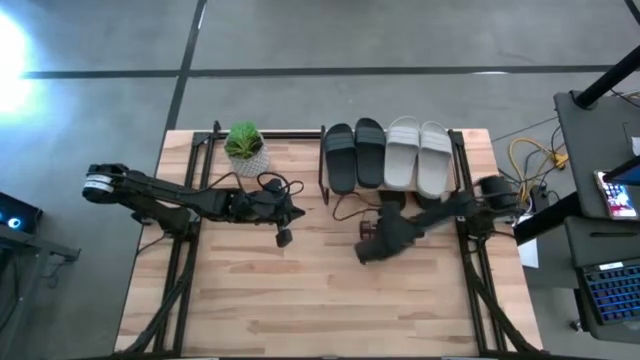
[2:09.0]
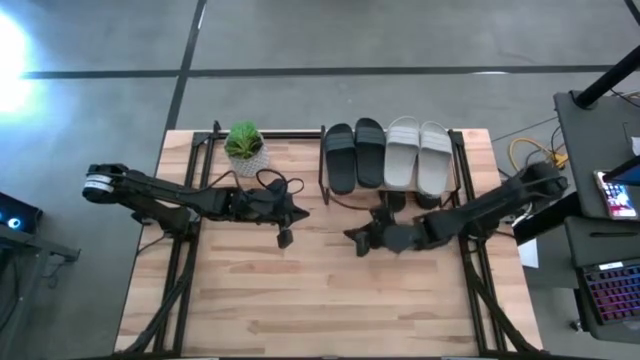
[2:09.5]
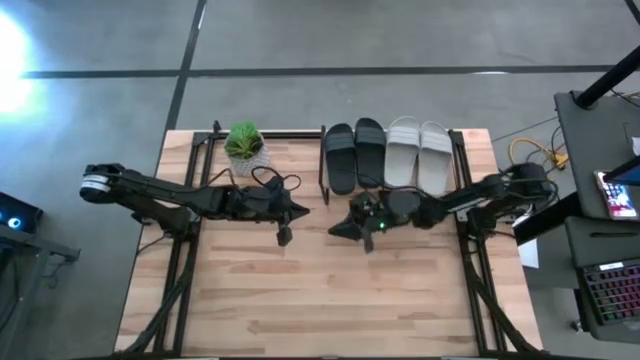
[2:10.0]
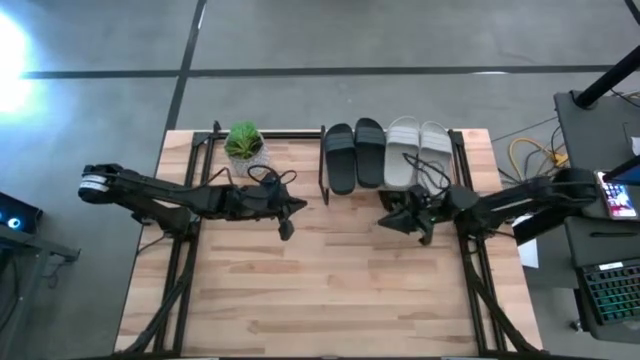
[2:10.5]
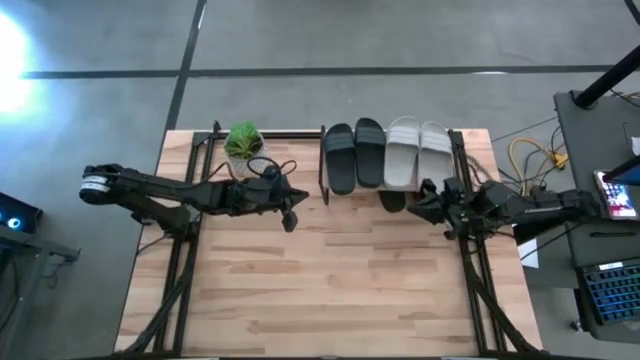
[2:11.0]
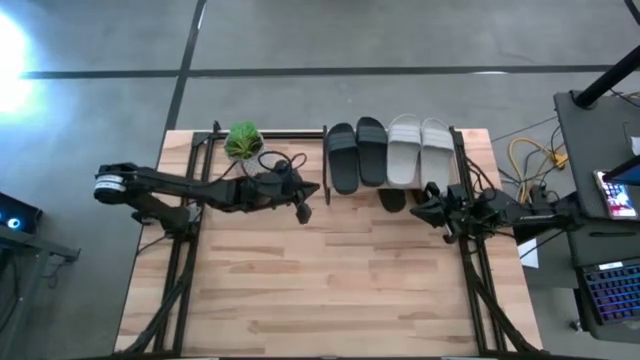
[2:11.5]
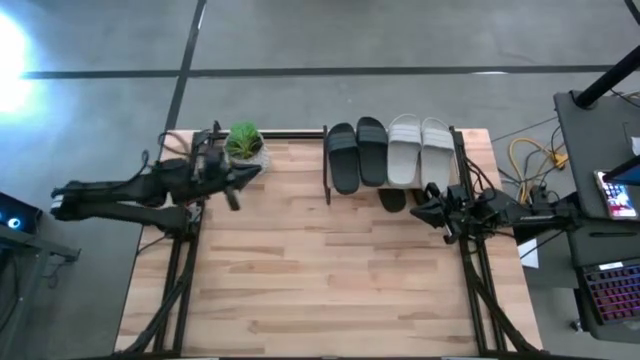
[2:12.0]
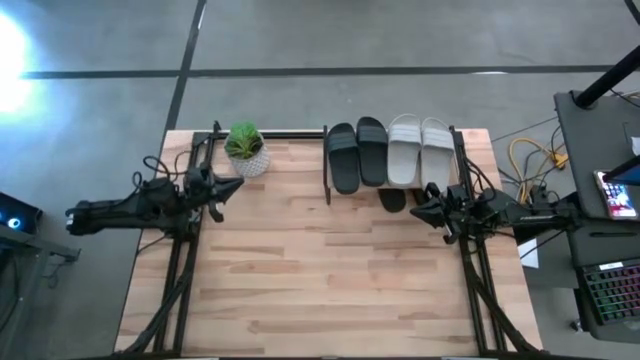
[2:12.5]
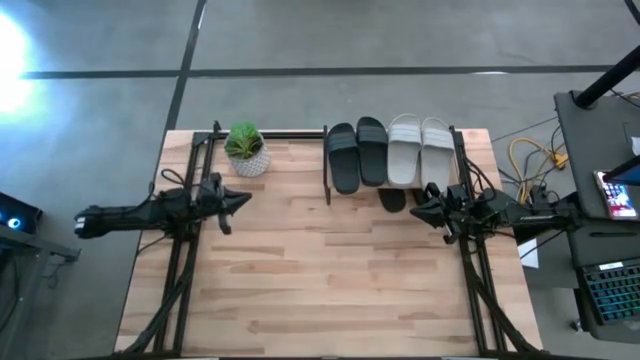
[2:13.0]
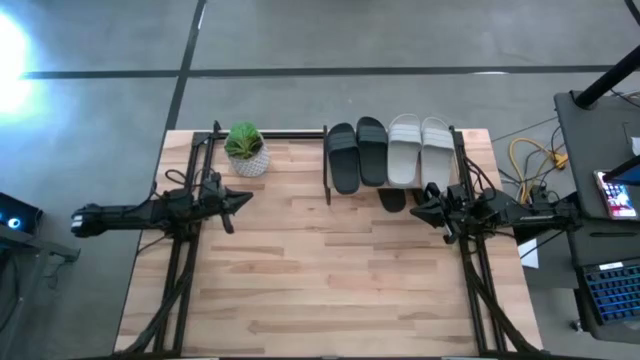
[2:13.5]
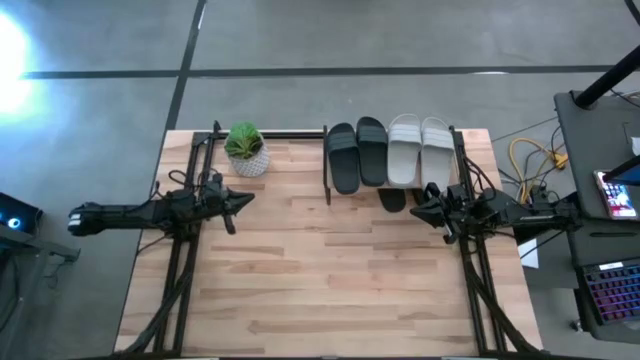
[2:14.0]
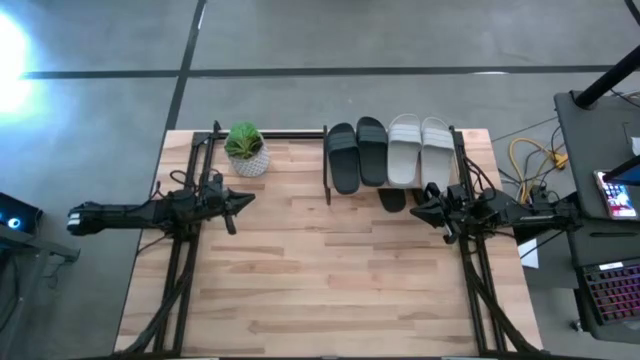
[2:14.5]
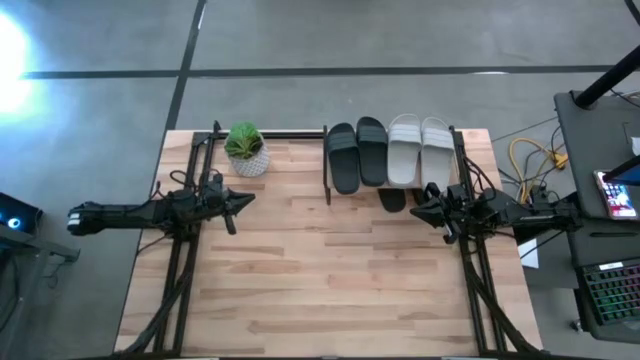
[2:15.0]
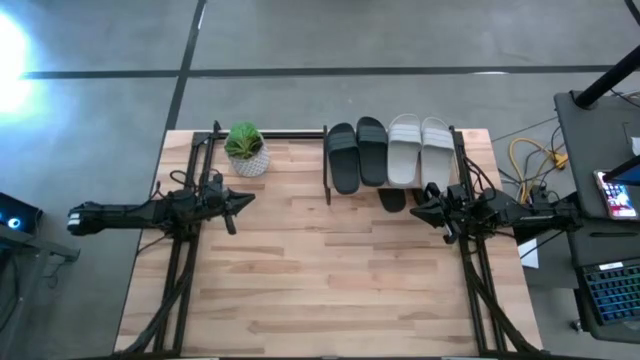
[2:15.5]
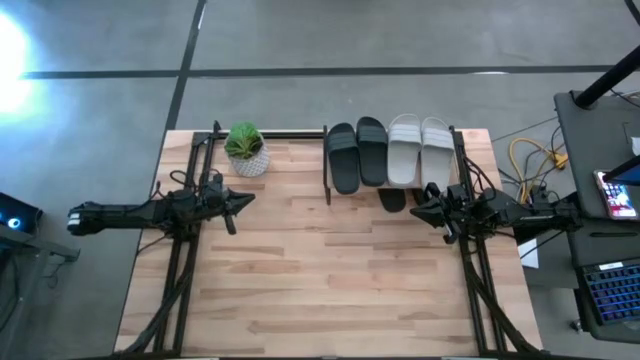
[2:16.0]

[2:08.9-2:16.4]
Task: Pick and place slides into the shelf
Return to Home Position

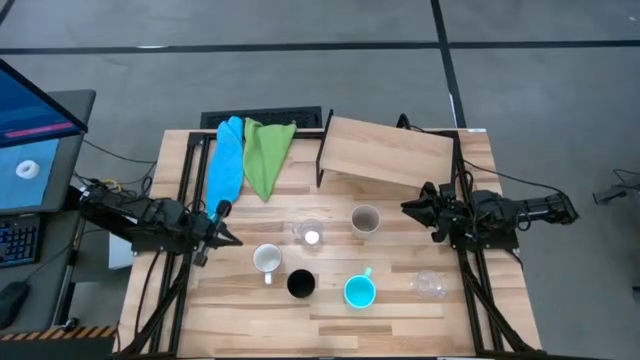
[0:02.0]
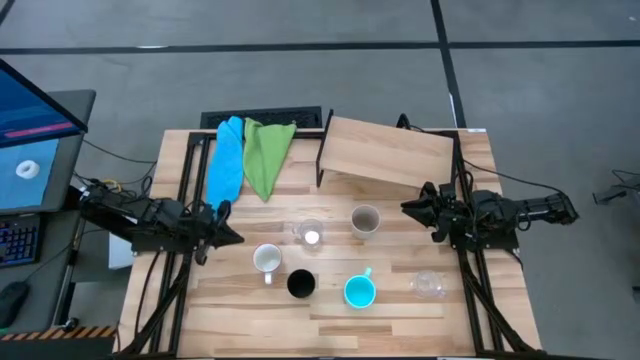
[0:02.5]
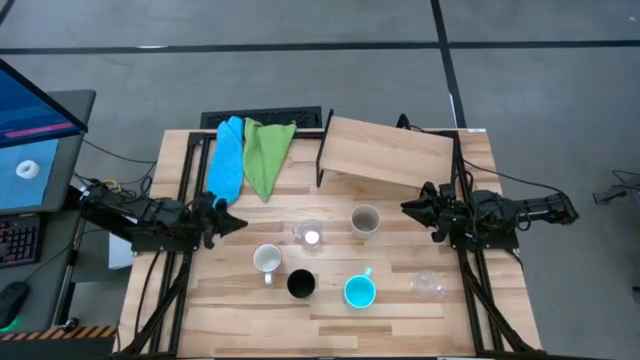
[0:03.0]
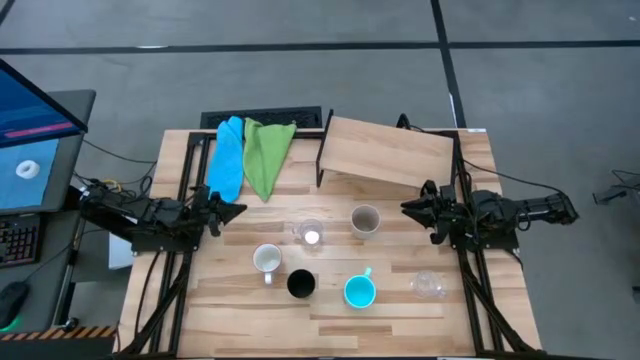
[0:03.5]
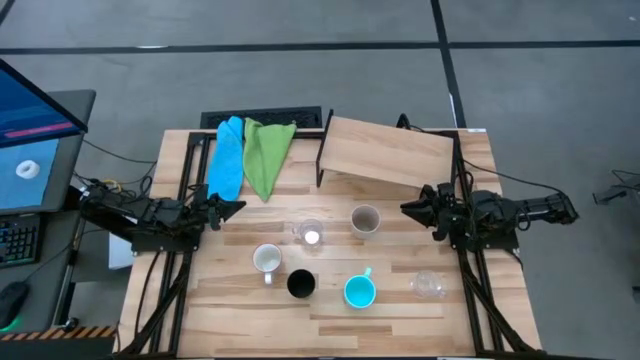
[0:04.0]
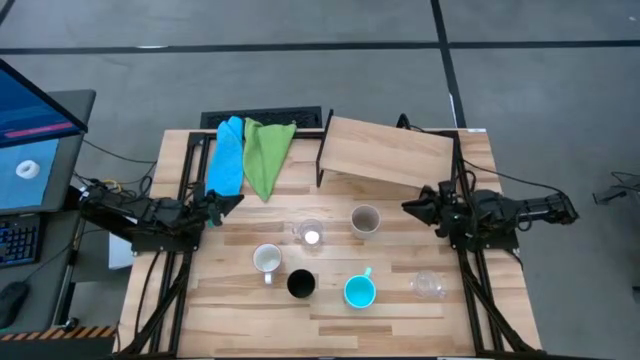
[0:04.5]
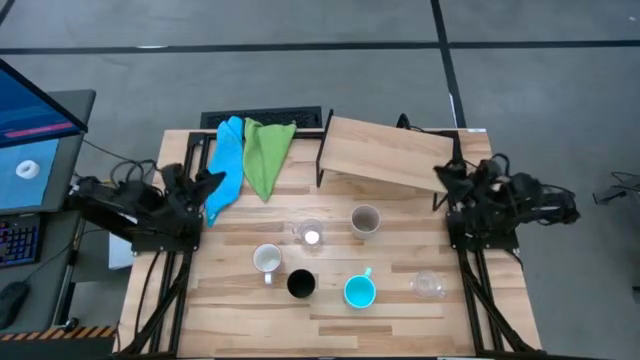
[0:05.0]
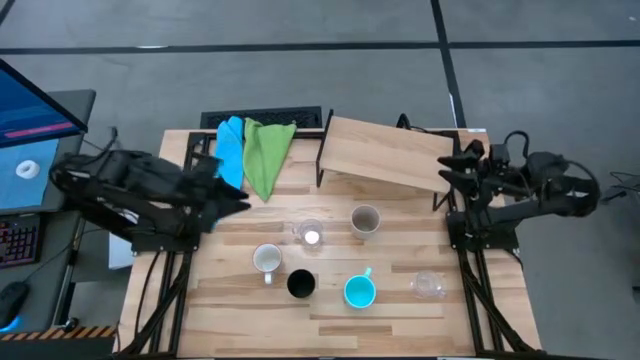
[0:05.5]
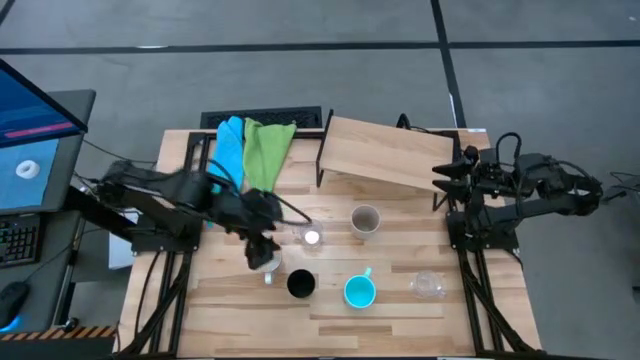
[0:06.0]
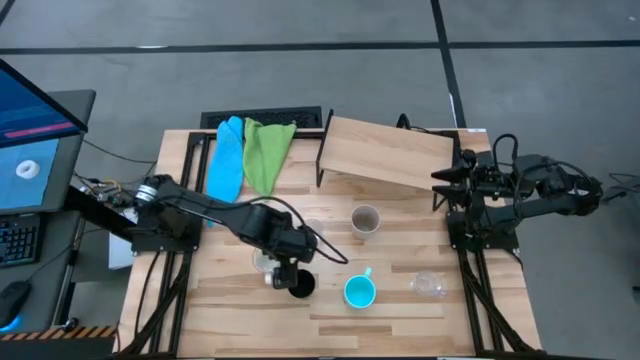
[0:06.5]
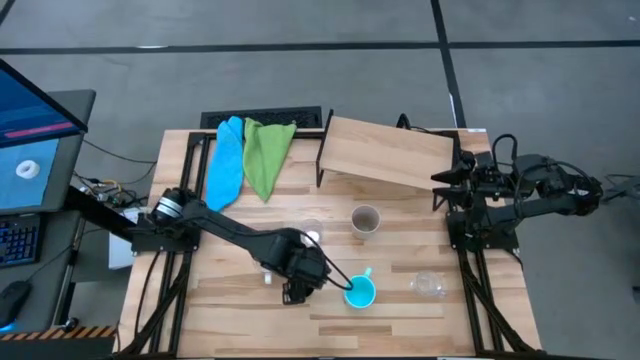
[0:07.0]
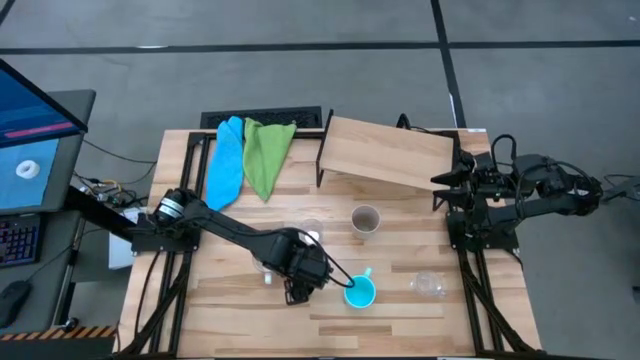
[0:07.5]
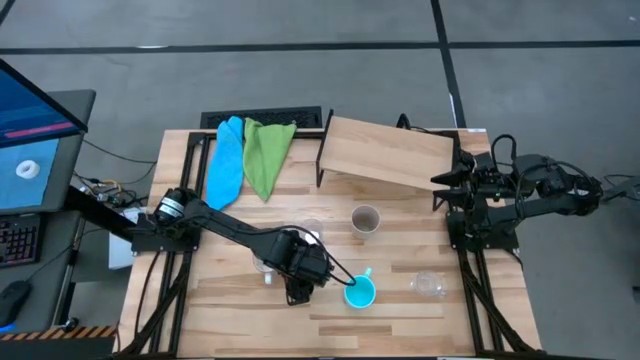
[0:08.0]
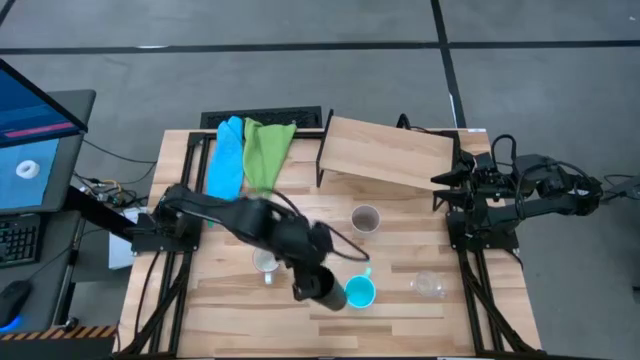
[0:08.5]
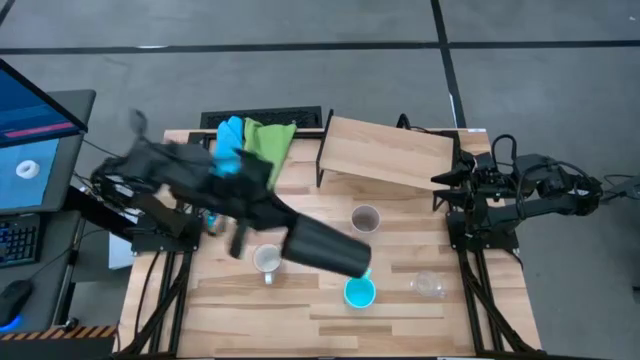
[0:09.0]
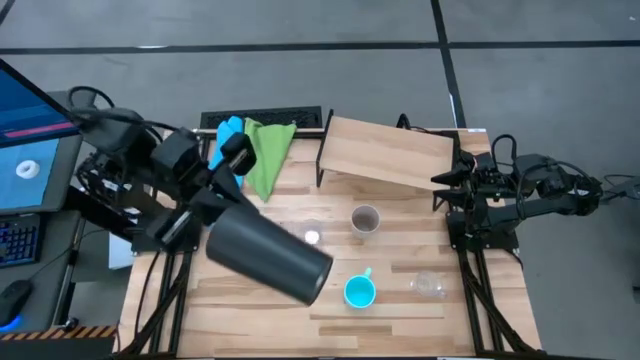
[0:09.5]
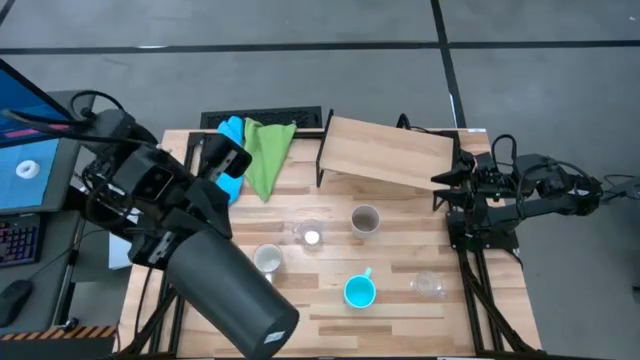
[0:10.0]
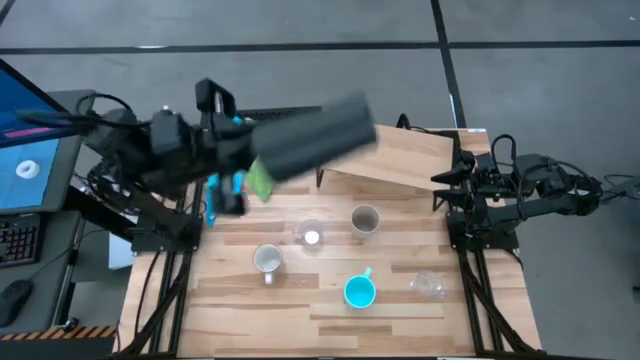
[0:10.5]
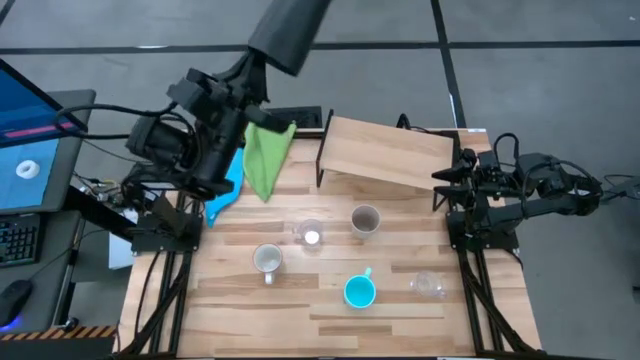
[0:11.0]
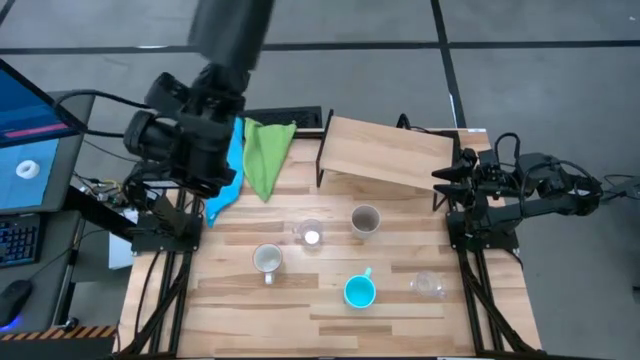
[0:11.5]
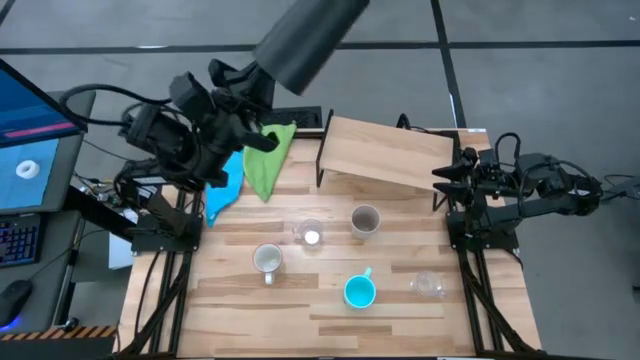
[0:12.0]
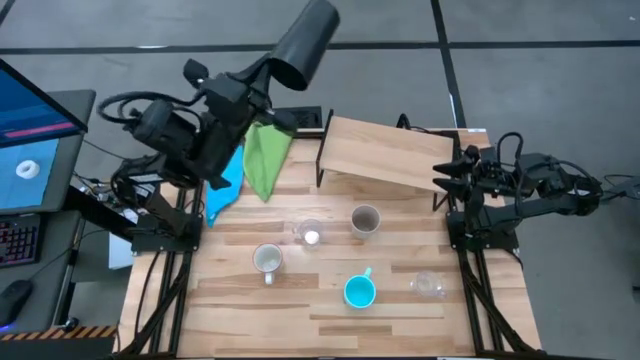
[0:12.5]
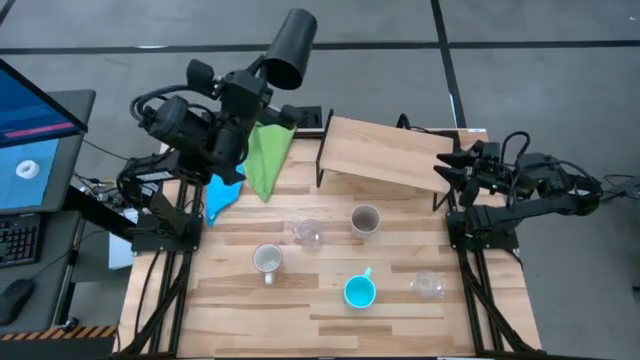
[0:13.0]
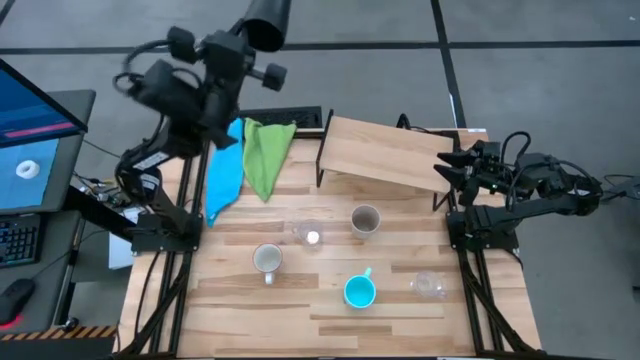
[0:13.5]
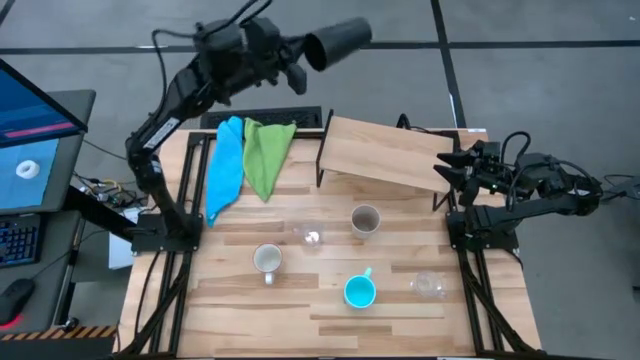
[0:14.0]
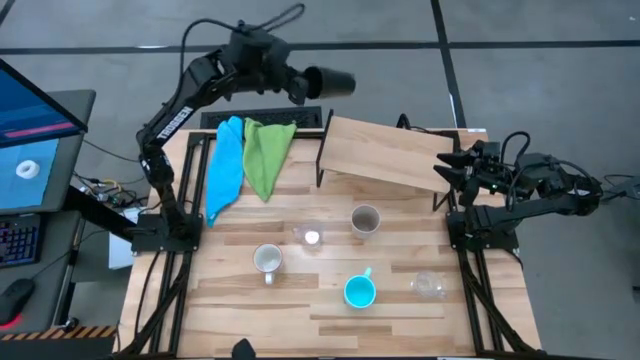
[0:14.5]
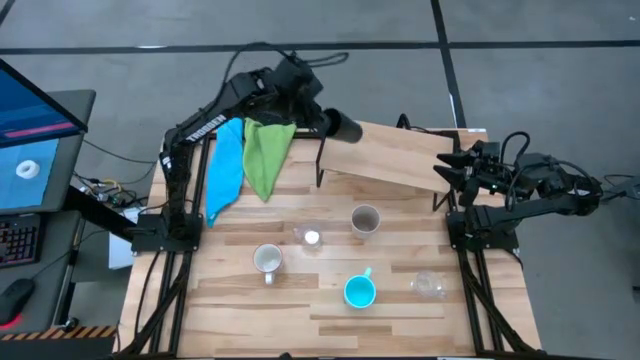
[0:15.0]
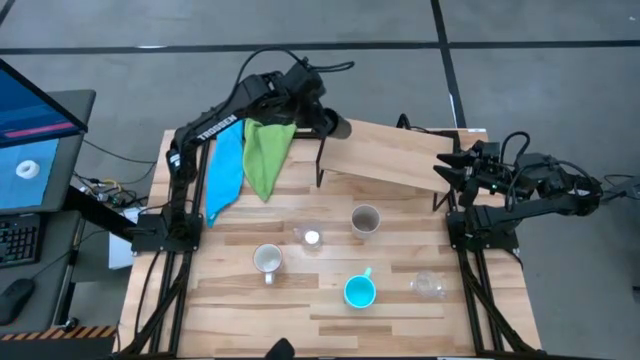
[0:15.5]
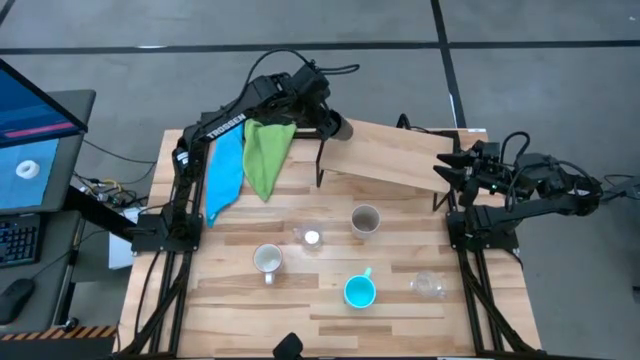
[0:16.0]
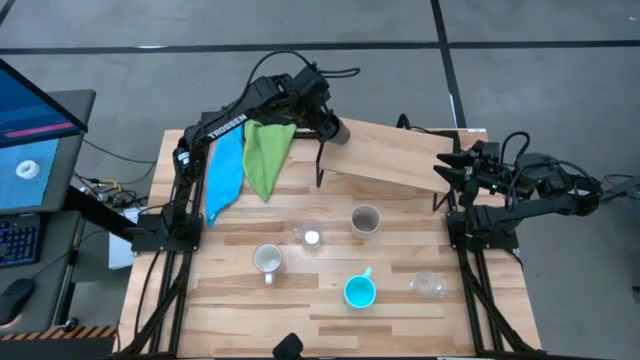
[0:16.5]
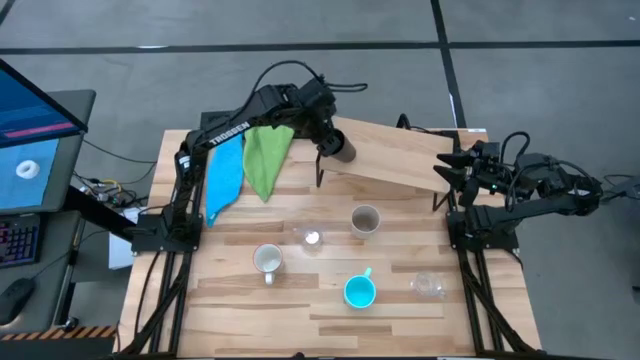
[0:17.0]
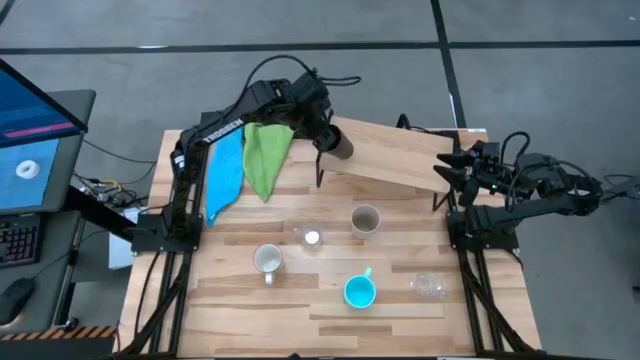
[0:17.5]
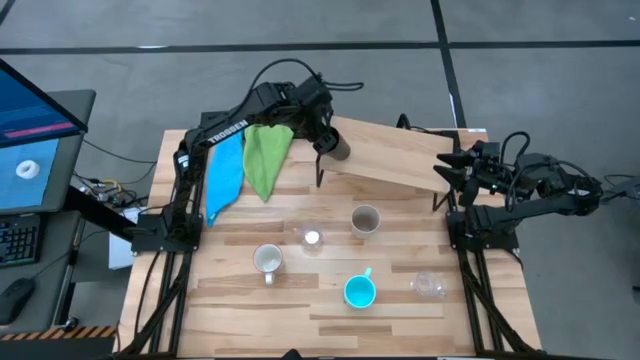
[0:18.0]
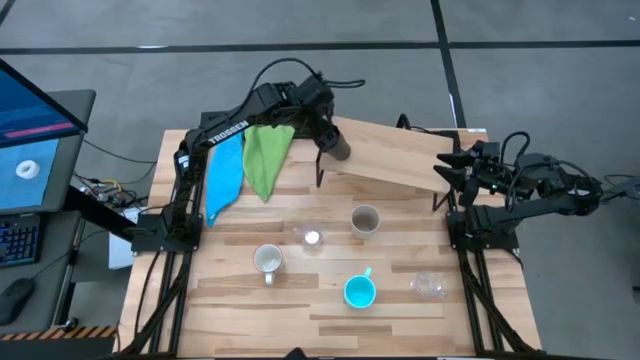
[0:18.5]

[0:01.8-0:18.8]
Task: Stack small to large cups/mugs on shelf
Put the black cup on the shelf
